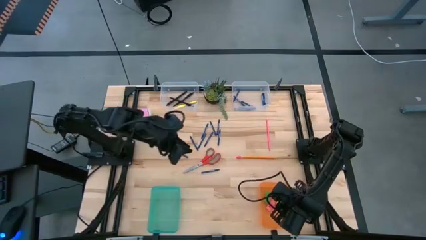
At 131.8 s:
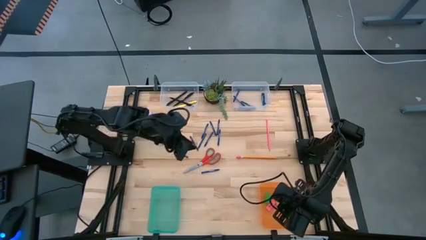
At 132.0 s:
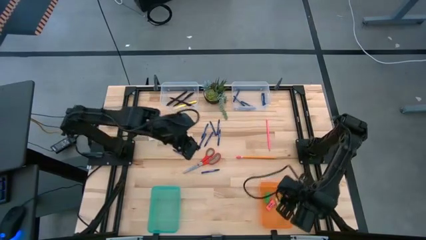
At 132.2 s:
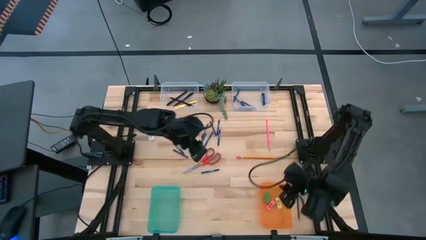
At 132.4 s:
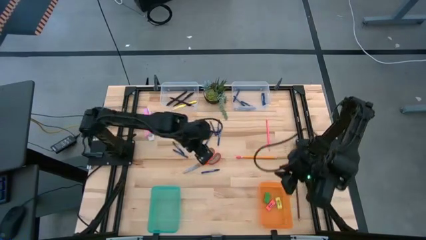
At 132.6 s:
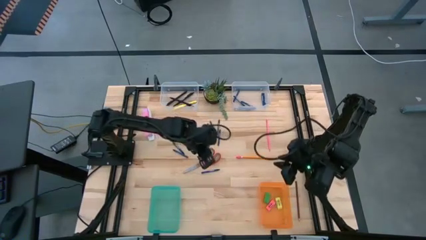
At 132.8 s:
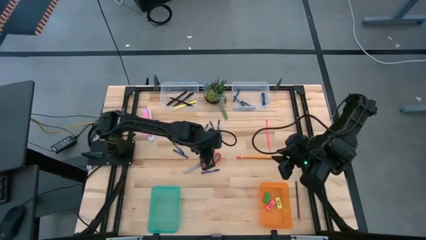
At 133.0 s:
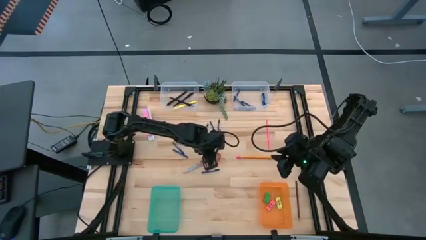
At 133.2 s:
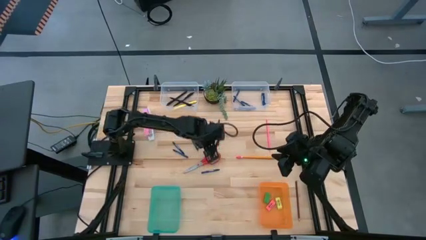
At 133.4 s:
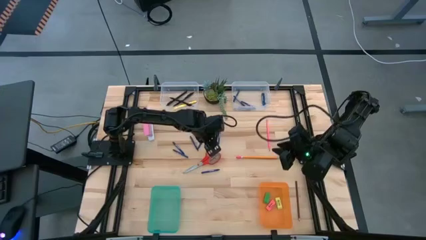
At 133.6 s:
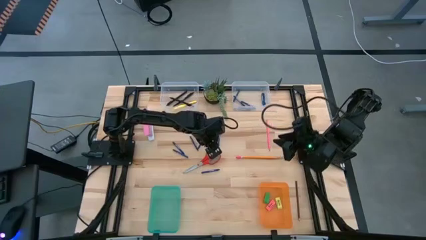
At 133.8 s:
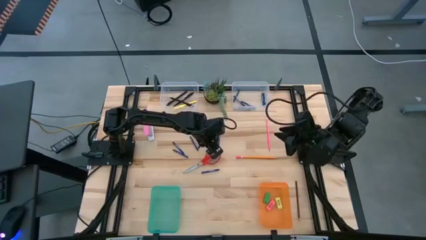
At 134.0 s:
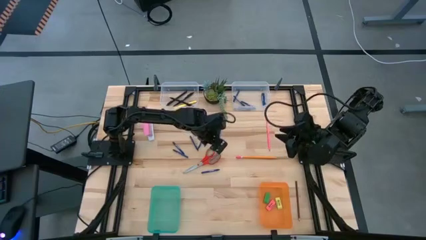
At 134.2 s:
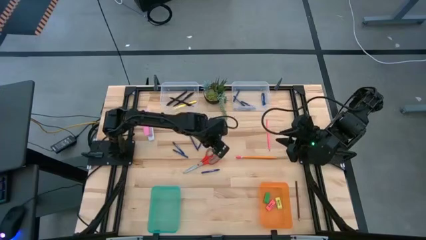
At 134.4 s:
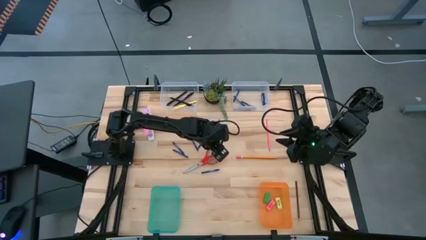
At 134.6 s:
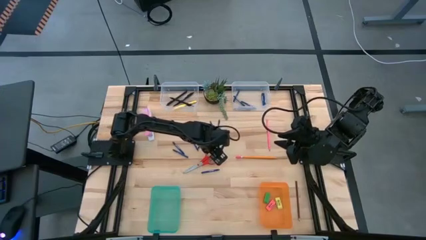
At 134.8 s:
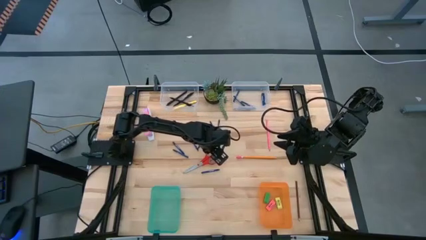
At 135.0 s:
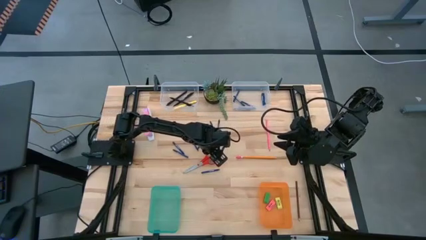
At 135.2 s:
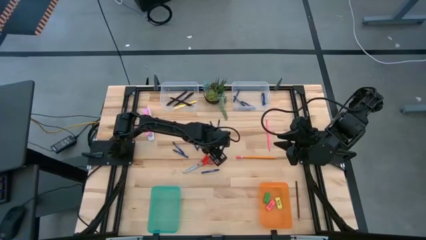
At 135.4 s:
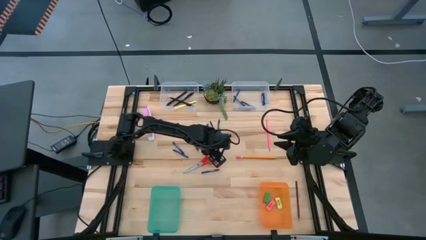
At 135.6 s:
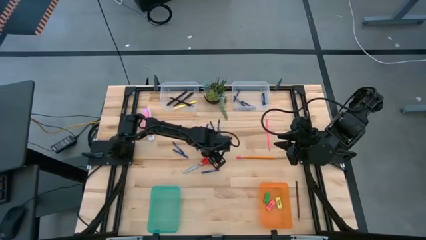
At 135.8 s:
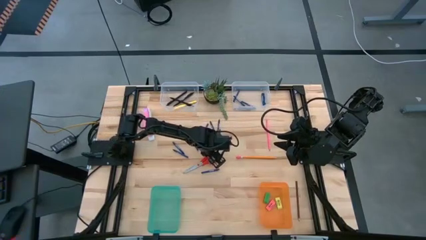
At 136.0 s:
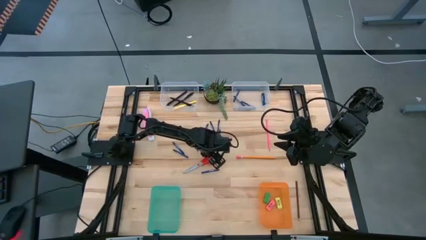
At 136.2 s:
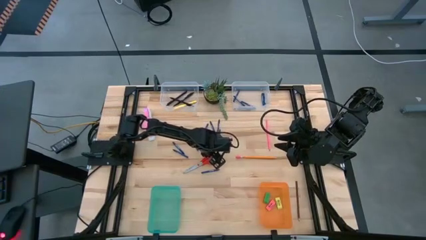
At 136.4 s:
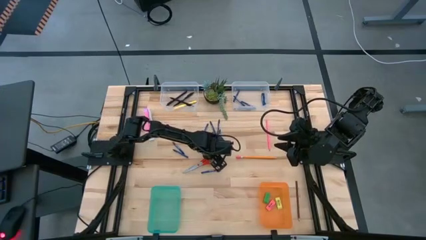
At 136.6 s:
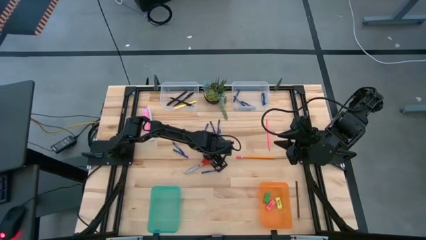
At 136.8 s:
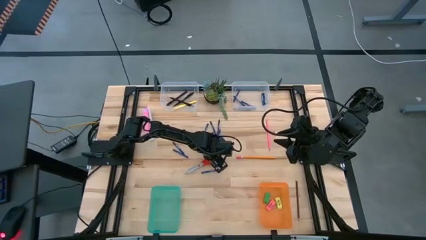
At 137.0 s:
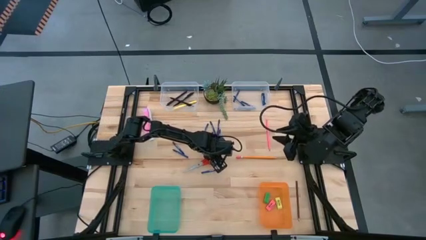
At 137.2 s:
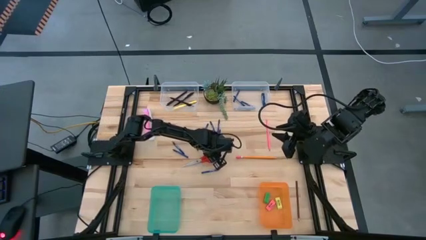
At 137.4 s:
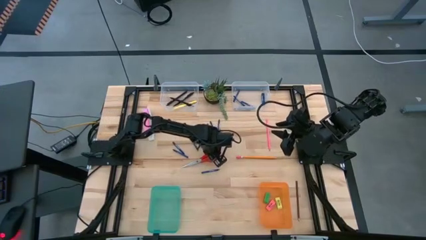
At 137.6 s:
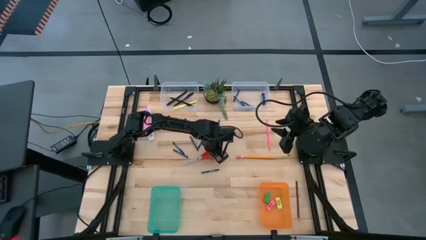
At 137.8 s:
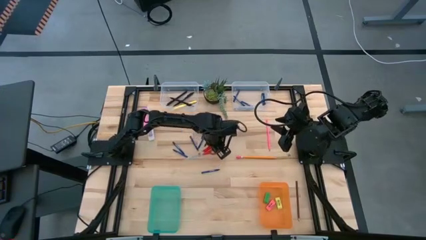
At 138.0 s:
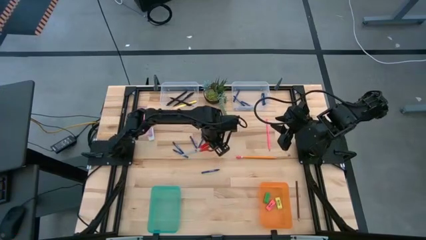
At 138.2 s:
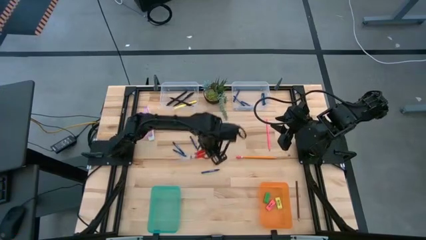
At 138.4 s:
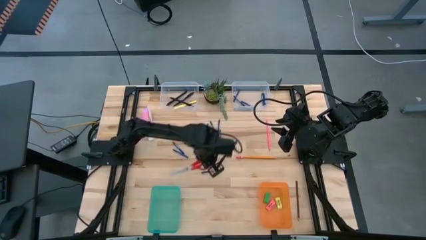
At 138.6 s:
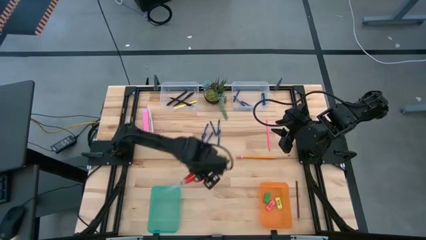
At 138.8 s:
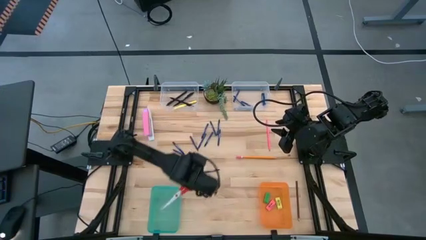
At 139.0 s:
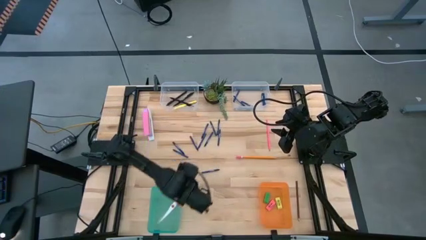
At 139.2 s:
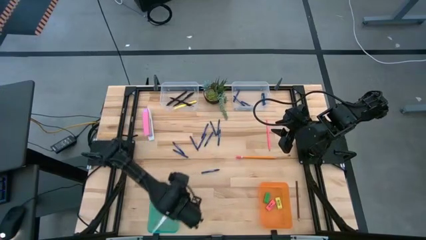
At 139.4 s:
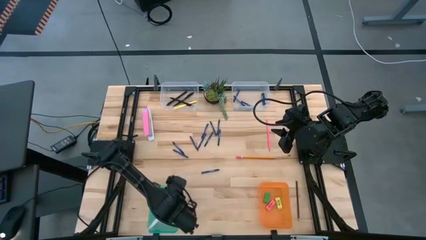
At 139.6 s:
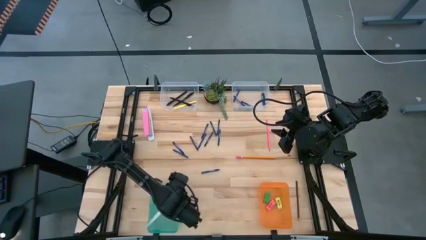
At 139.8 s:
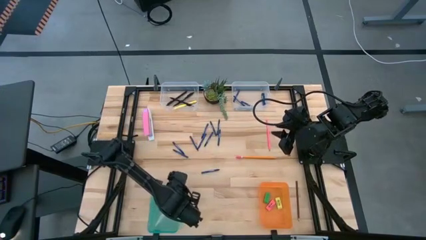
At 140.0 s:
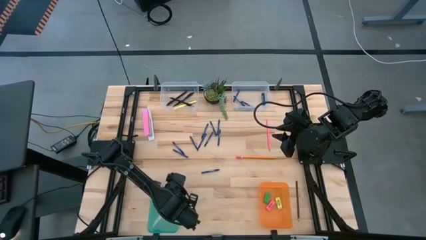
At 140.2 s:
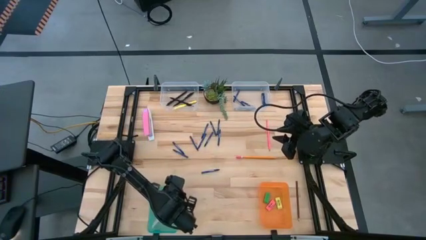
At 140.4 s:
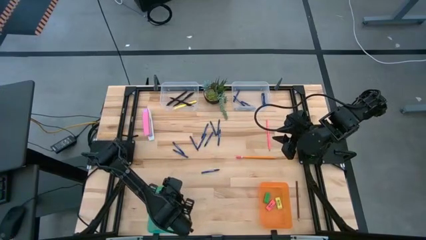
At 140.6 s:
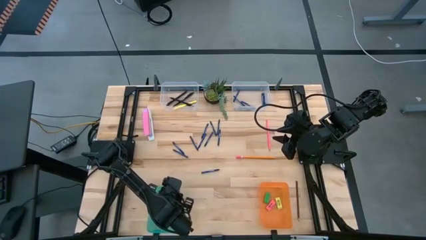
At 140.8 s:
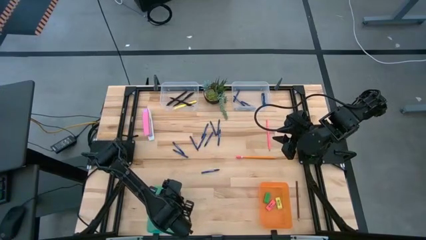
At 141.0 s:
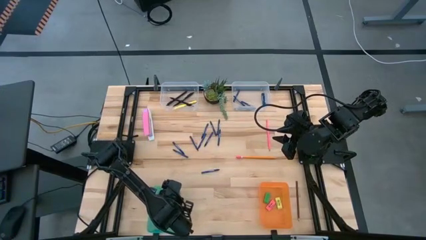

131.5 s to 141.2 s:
Task: Sort crayons/erasers/pens/pencils in bins
Put the red scissors into the green bin

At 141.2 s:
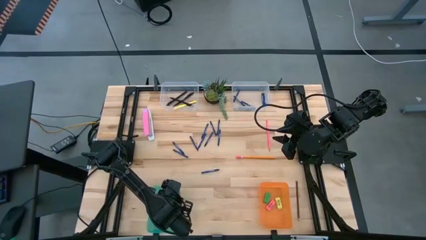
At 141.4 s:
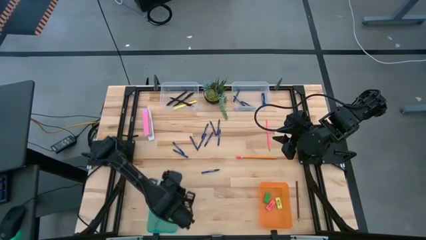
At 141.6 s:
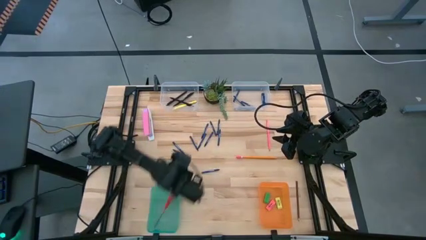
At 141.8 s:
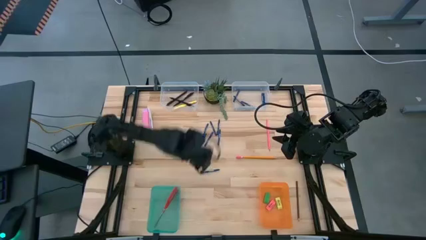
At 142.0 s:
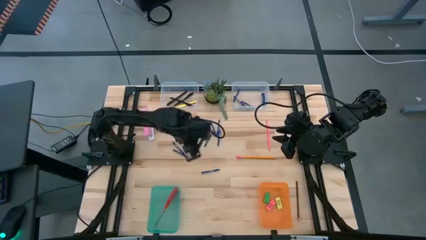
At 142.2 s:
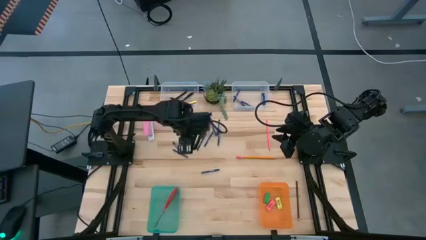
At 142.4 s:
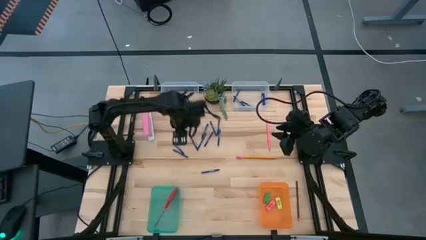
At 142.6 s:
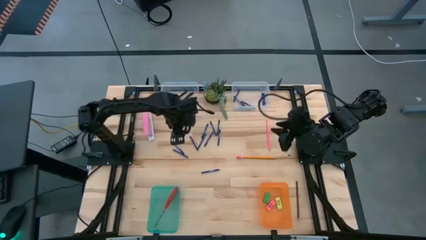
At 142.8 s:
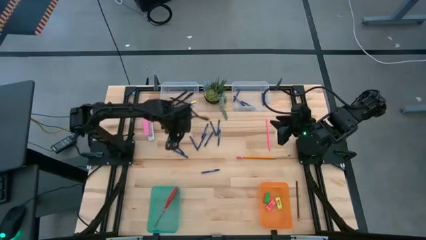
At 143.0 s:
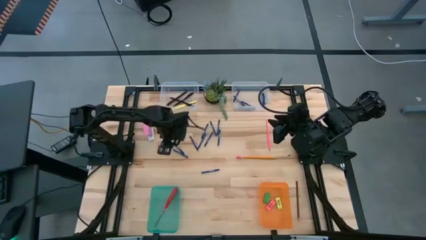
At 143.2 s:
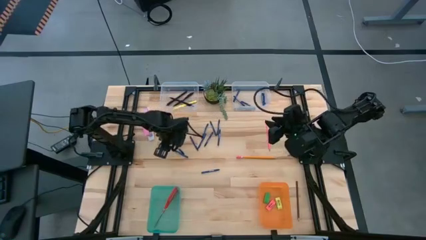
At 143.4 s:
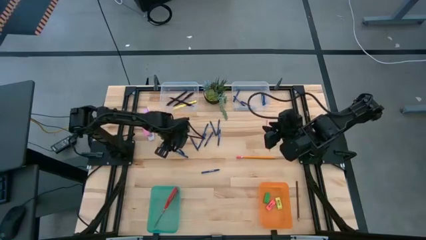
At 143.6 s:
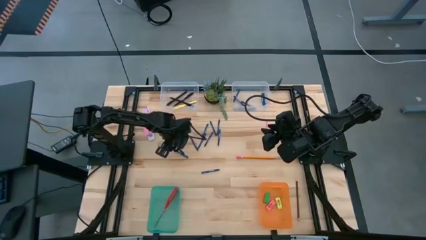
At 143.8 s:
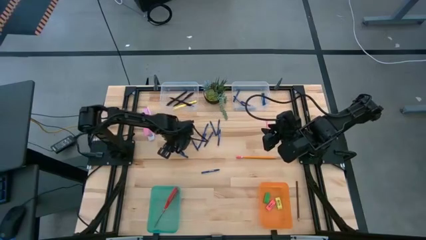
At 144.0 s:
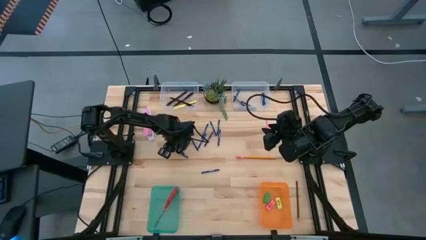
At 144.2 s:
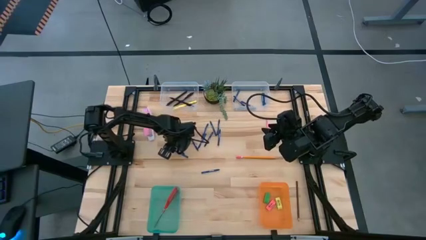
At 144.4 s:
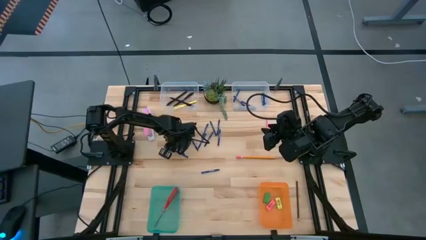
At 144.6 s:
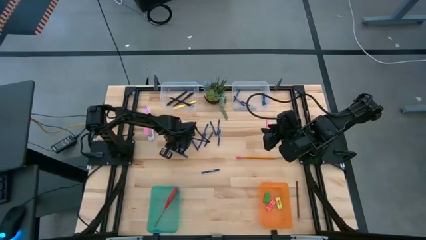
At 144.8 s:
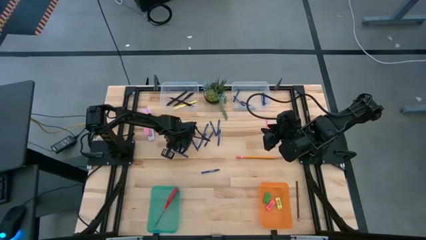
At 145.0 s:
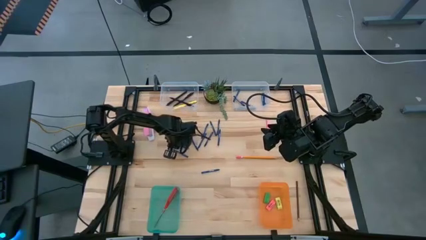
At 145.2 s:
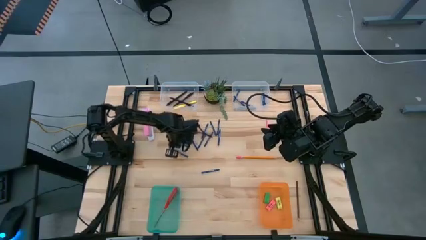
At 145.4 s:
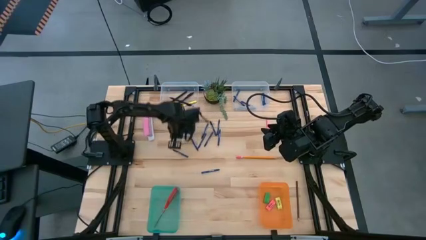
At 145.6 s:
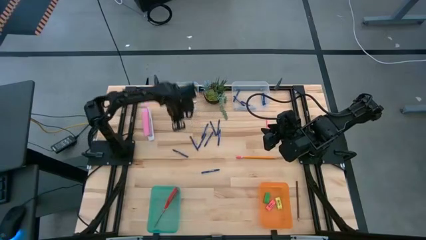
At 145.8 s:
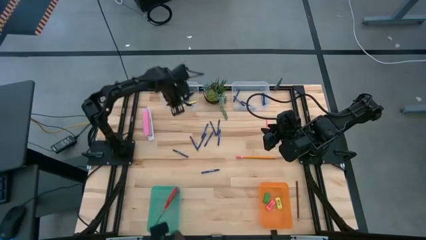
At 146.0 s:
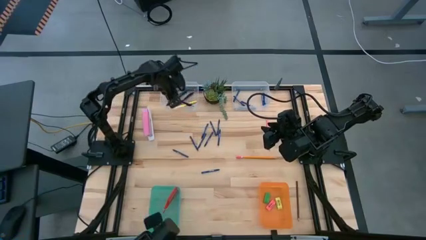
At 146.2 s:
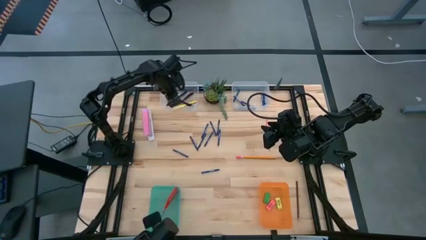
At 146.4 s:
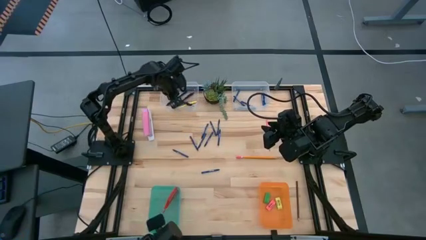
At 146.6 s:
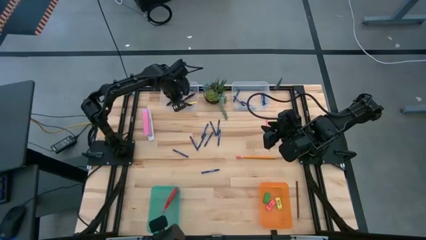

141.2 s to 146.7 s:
Put the blue crayon into the right transparent bin

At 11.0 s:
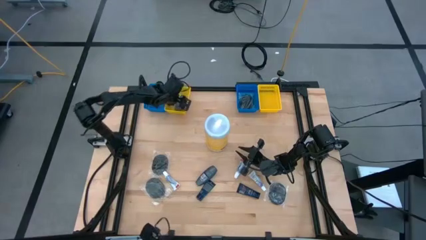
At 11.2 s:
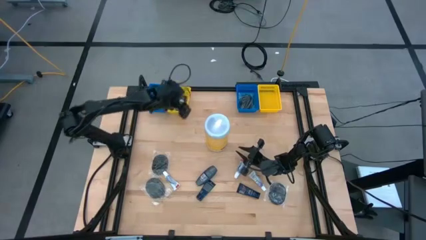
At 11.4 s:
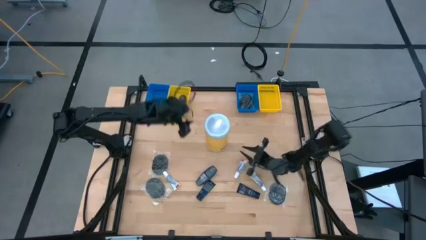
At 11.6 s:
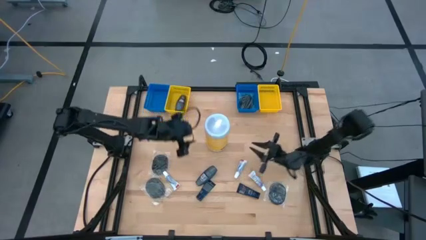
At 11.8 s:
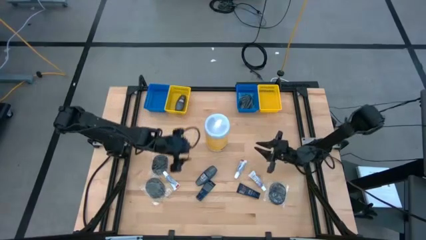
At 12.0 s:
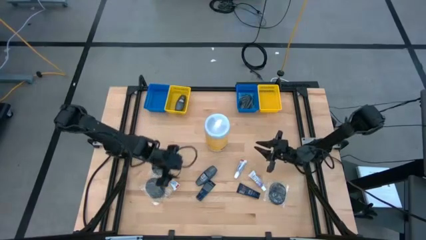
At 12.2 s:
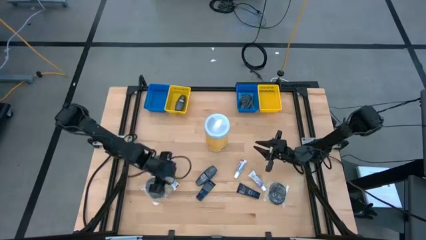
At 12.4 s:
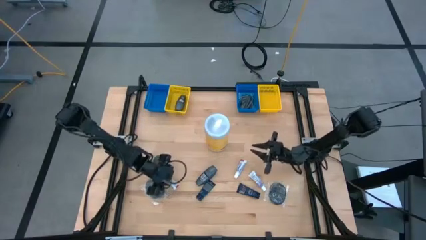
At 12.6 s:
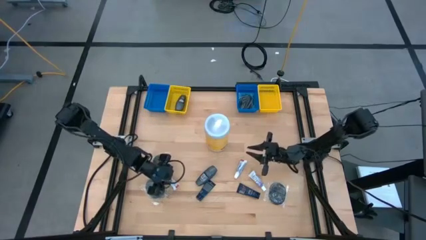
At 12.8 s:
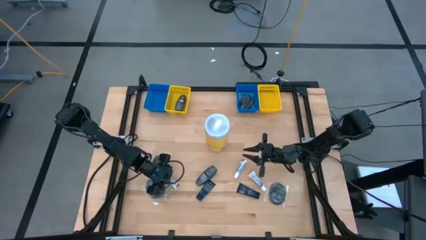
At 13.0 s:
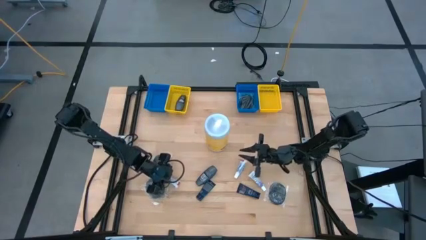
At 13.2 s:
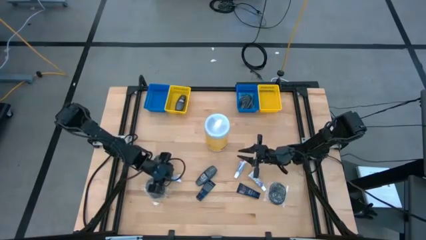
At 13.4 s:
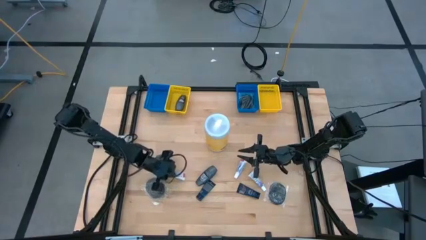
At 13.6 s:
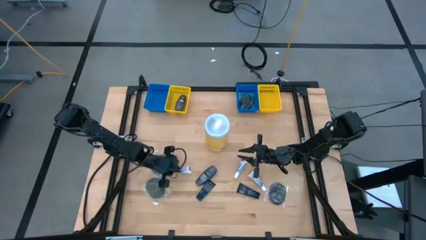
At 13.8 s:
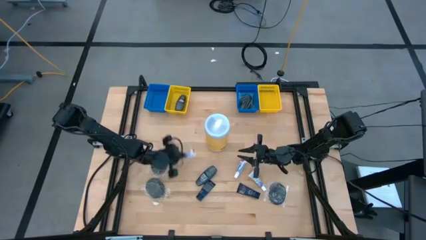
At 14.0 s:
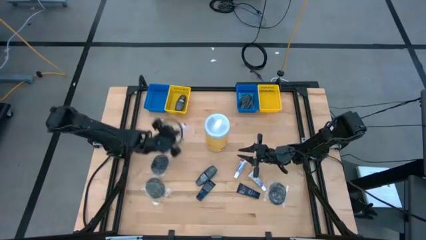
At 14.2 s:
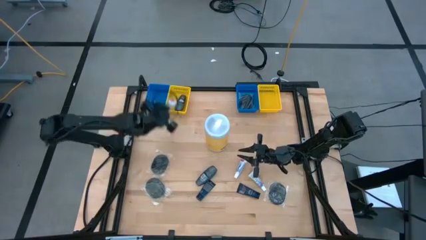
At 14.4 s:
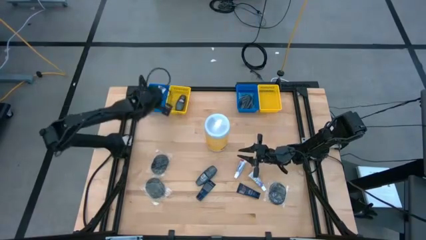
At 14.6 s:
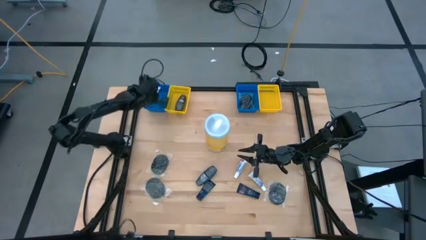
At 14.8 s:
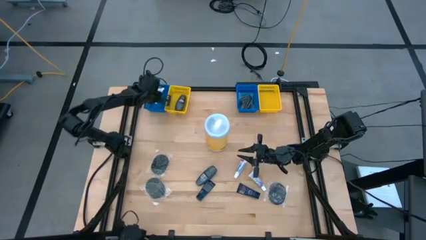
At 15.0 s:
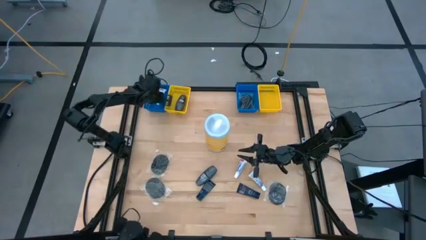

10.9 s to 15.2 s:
Task: Pick & Place Travel size toiletries
Put the left toothpaste into the left blue bin
